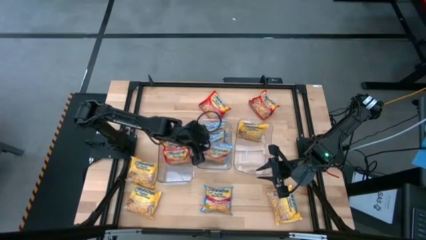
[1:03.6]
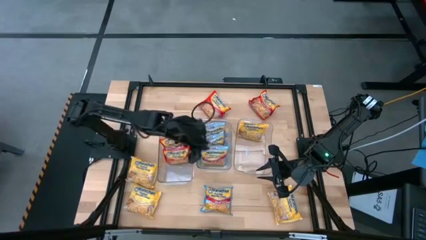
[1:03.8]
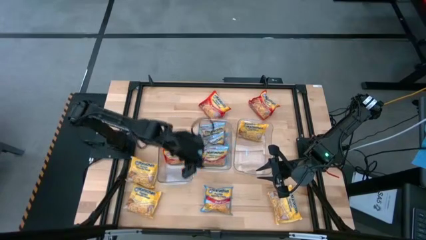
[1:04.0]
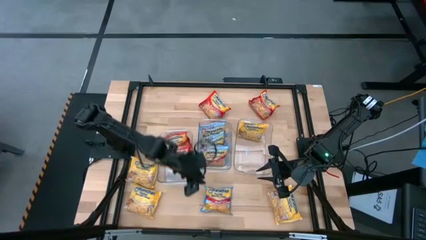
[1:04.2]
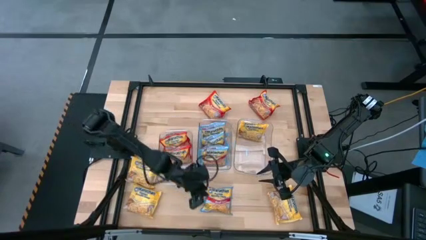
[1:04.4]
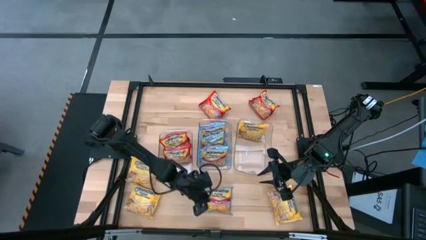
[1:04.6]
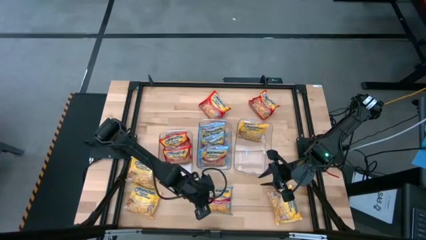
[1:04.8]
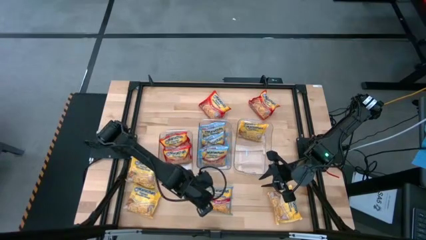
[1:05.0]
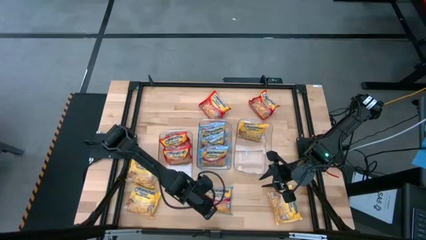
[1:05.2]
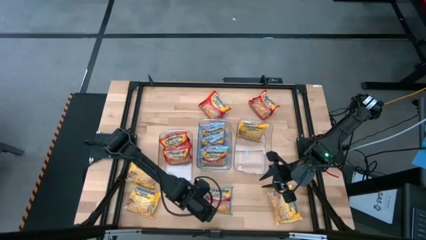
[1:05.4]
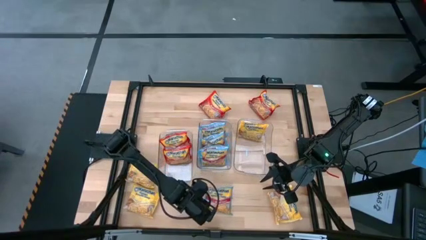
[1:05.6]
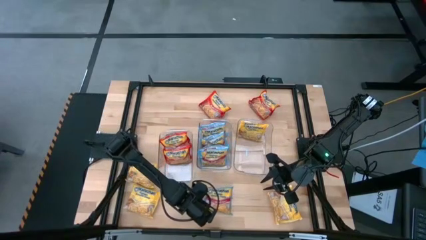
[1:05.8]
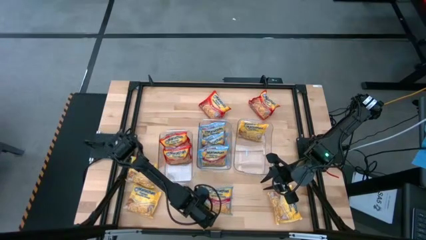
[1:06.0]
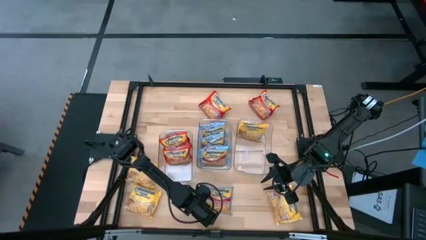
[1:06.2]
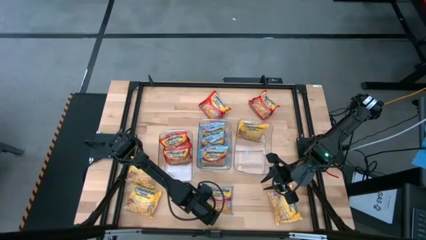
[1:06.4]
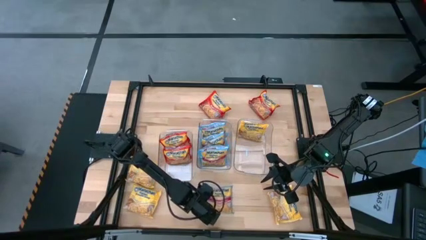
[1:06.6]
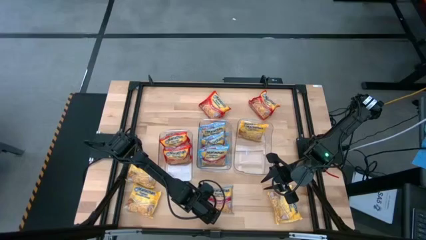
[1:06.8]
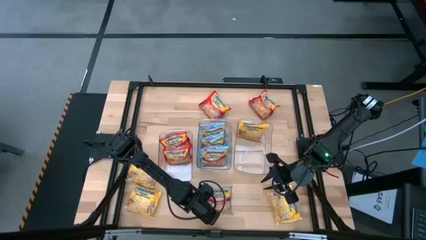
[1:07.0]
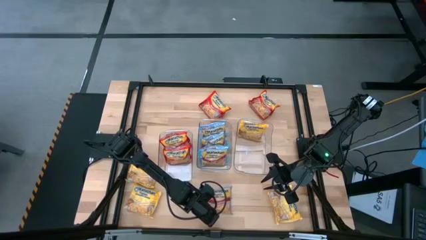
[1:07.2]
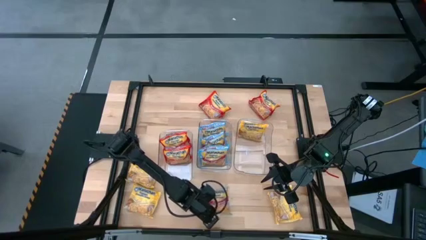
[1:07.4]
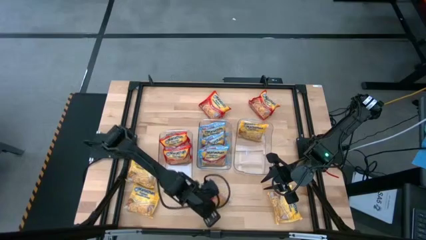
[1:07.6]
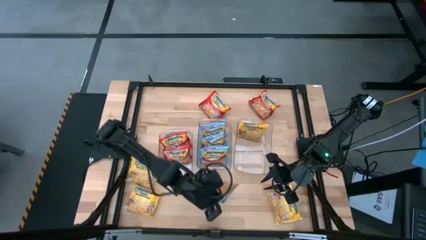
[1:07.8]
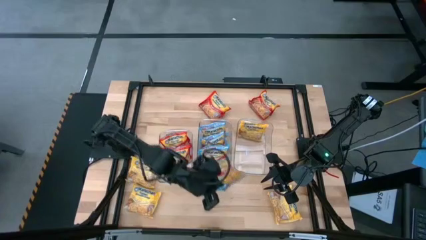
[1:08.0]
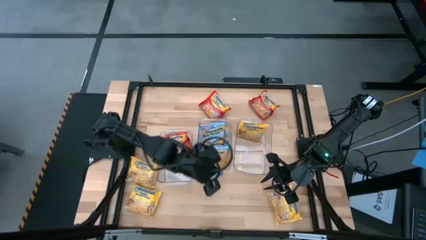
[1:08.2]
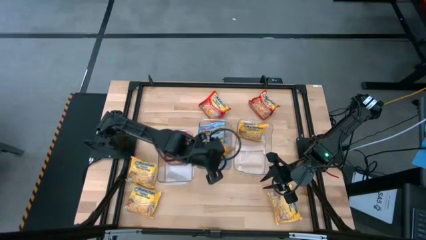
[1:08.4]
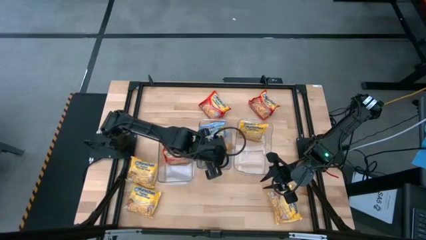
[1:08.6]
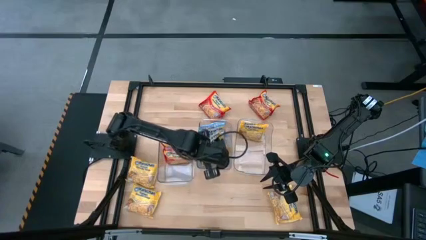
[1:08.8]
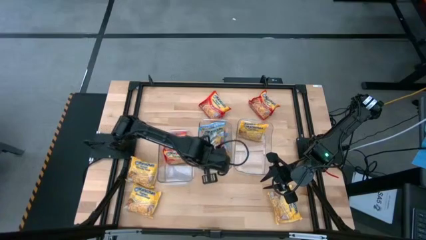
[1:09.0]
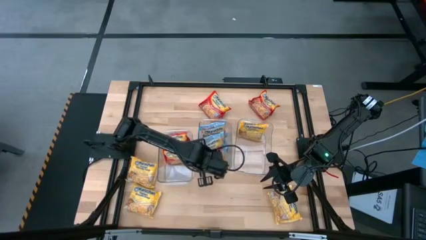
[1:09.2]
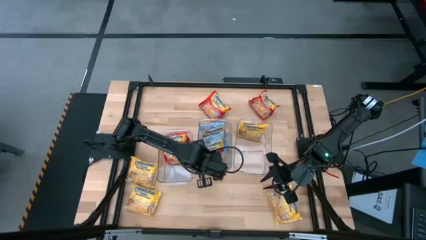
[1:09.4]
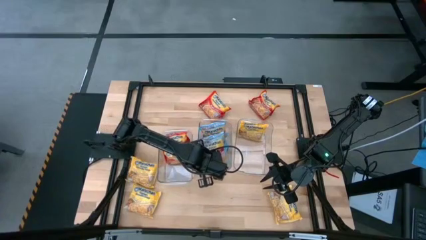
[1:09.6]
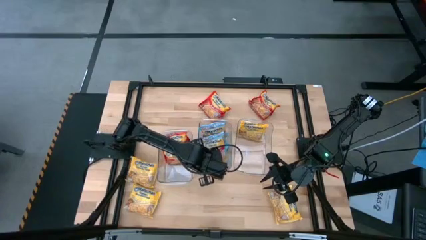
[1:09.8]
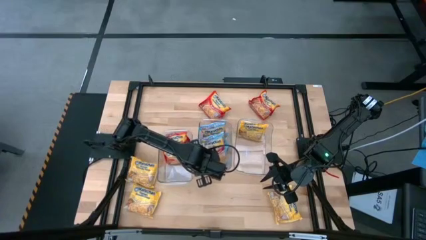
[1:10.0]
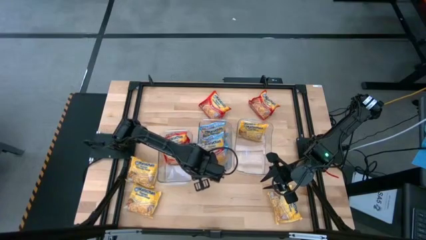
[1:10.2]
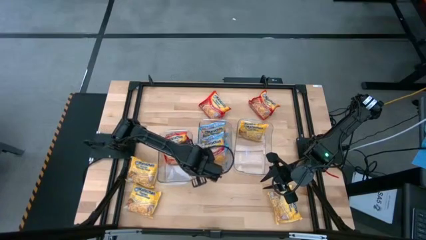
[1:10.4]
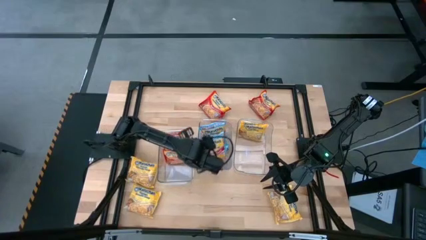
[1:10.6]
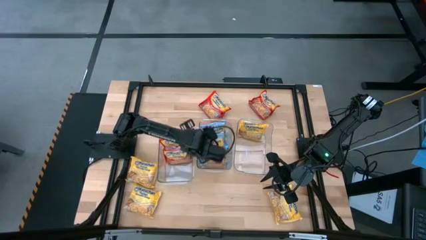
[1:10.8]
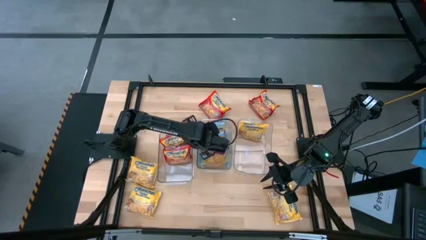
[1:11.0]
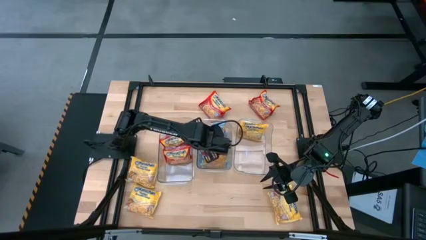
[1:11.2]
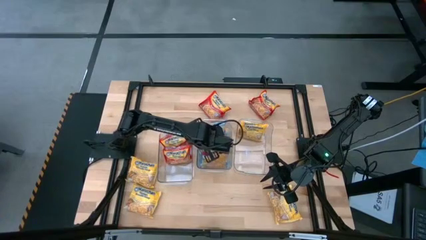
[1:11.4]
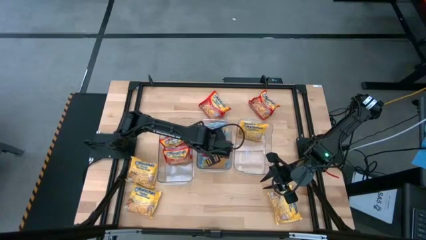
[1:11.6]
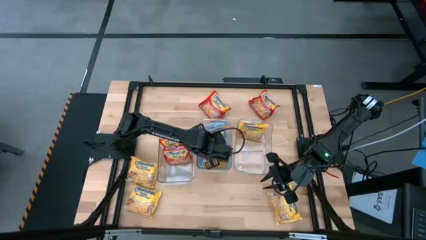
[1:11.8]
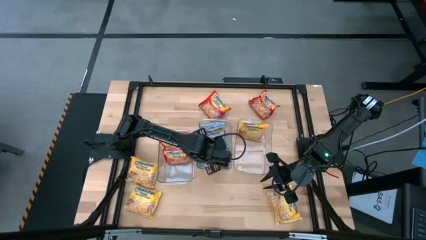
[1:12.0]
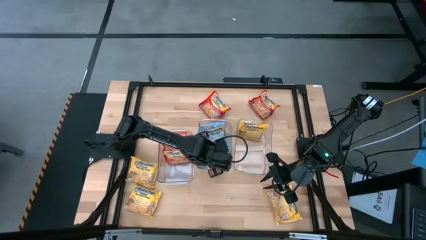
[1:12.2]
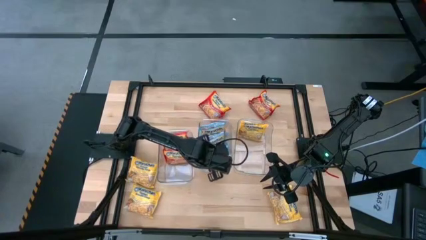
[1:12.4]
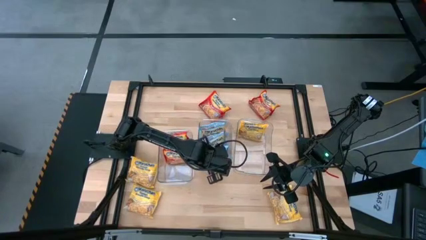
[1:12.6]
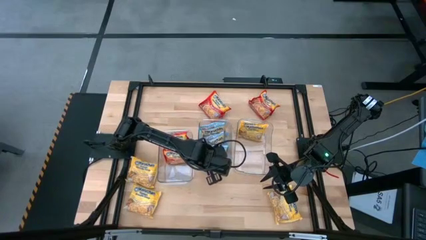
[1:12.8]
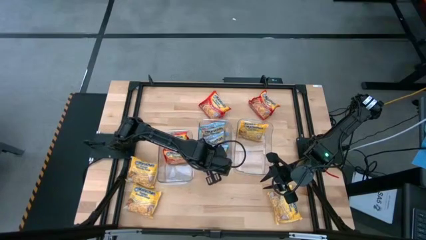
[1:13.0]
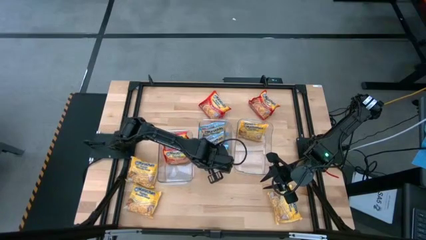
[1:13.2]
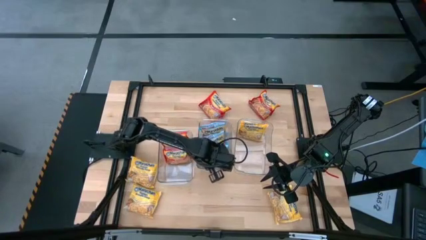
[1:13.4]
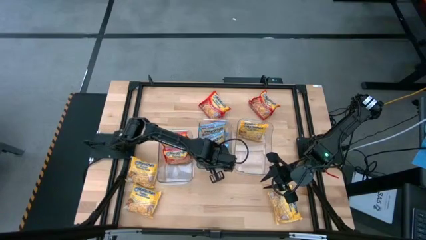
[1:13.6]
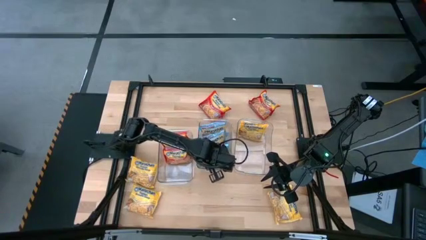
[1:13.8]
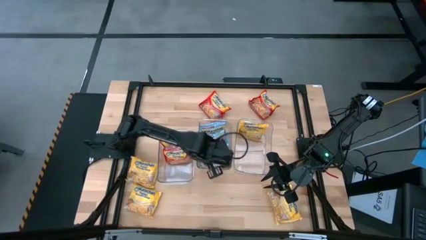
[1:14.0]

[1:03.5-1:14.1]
Task: Sort Maruchan noodles
Put the blue noodle pack into the middle transparent bin

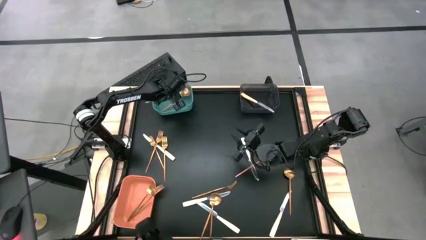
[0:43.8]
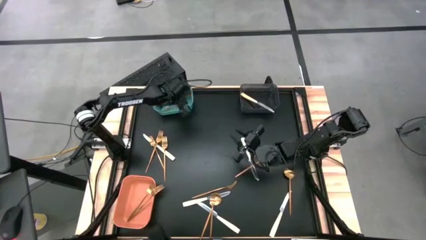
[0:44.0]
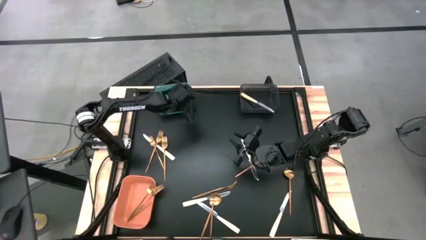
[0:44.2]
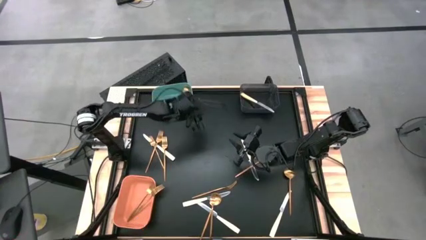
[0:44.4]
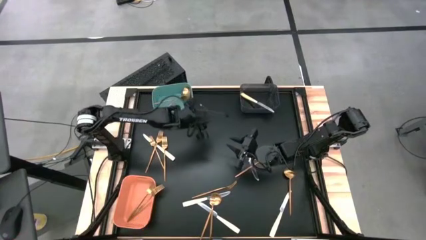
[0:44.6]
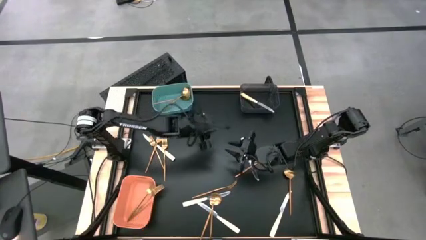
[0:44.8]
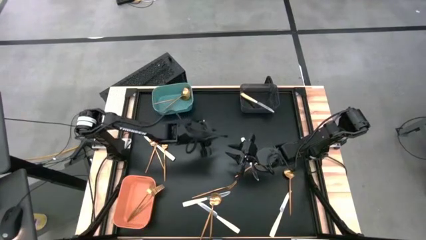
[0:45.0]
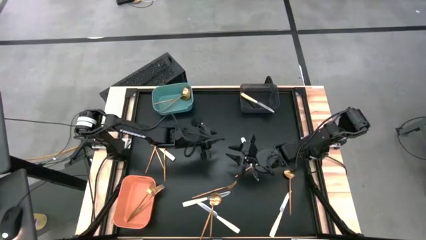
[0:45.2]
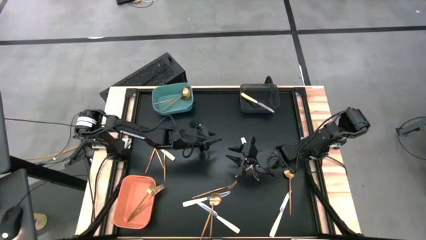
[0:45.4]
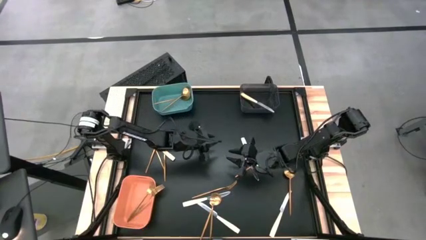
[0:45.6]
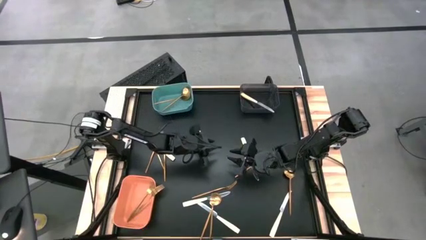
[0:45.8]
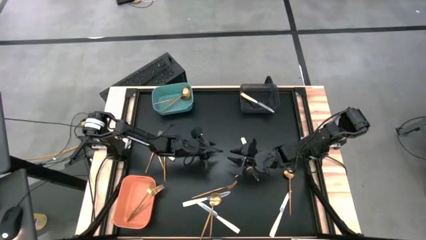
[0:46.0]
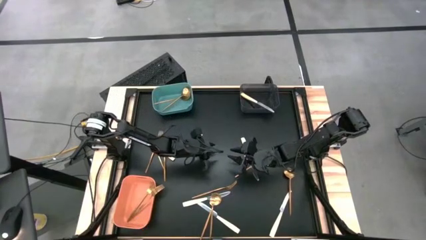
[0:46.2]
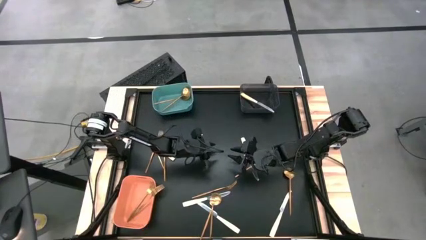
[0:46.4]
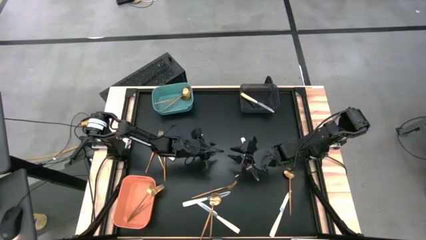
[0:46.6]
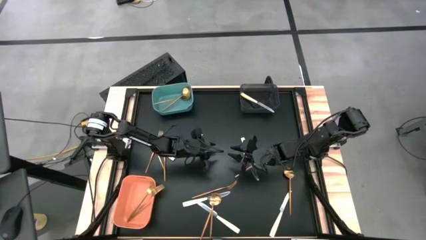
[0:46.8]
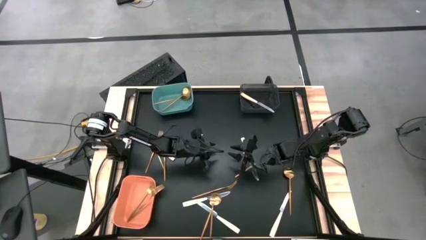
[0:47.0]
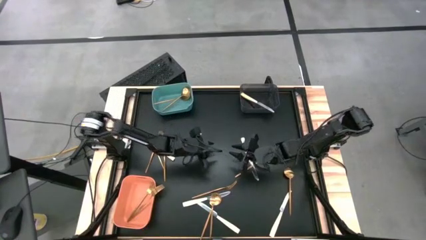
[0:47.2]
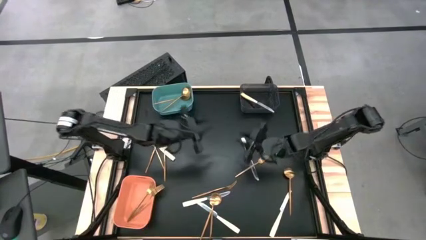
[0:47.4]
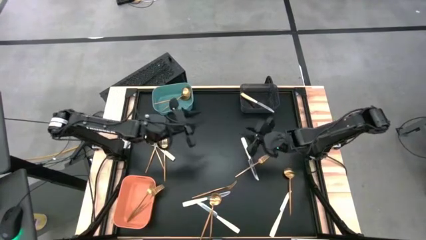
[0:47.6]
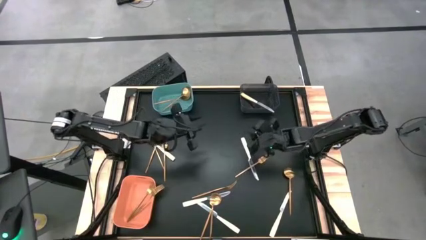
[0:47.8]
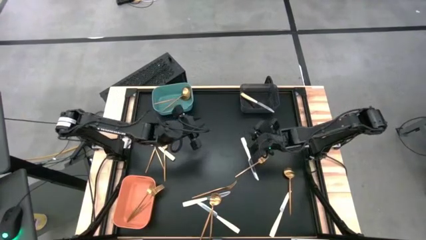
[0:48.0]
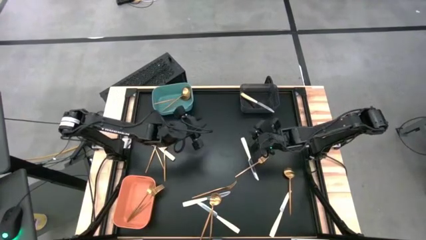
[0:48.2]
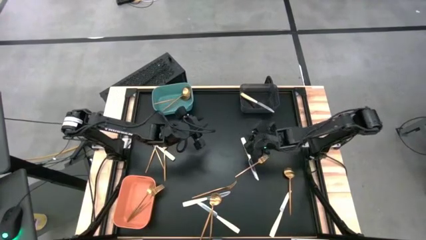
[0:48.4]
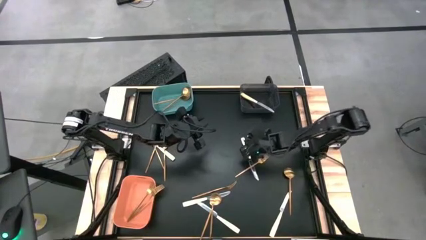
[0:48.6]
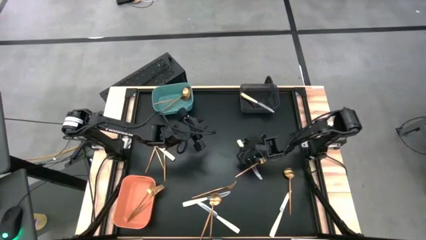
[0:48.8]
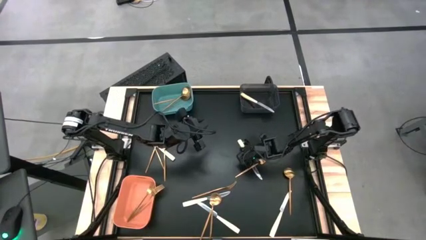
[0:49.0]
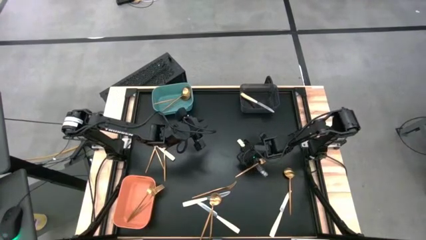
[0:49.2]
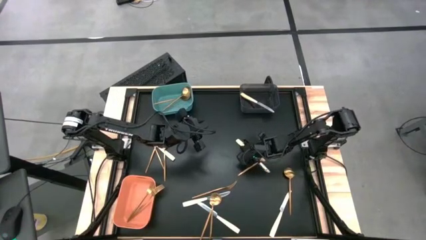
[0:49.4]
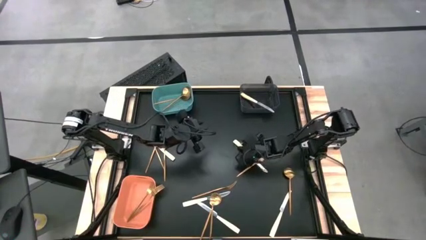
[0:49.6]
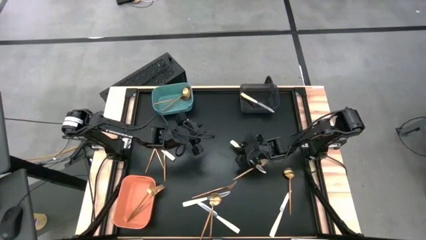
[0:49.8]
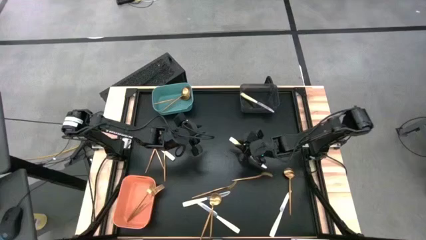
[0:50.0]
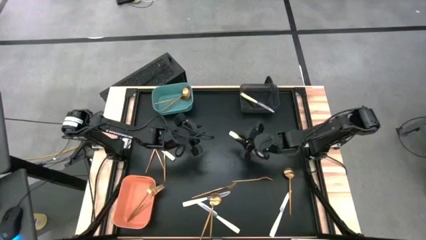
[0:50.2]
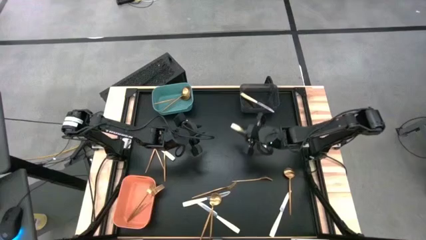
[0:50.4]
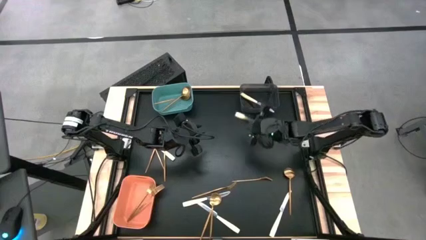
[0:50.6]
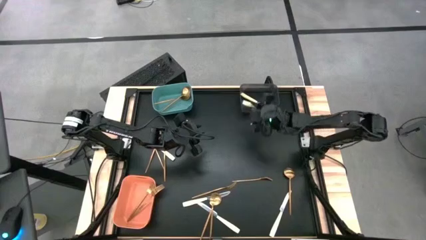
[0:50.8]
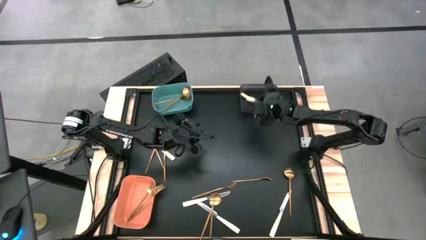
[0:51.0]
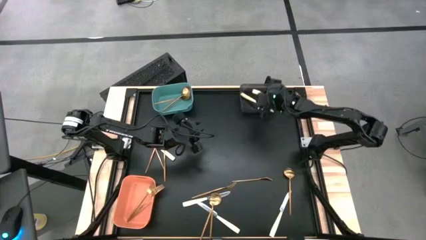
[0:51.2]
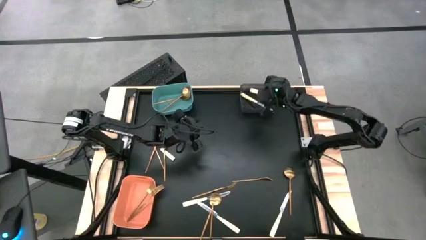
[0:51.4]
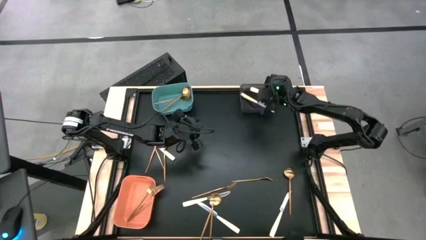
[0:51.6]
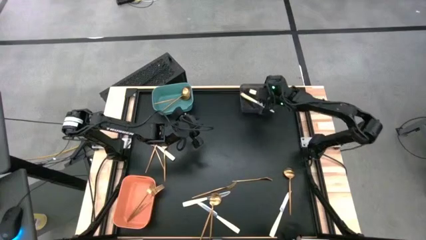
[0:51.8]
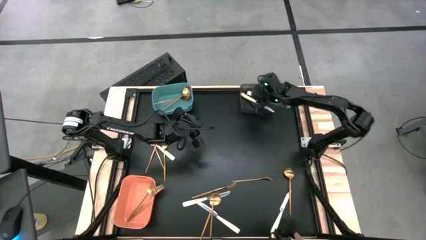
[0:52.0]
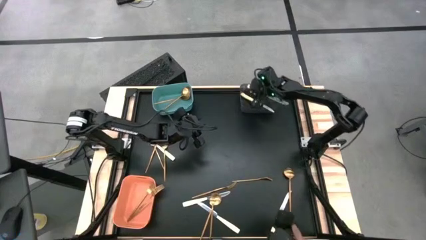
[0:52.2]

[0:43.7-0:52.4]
Task: Sort silverware by color (type)
Put the yellow knife into the black bin
